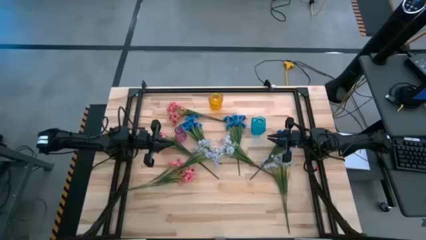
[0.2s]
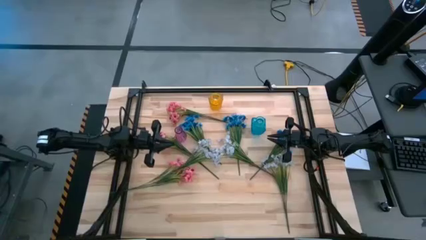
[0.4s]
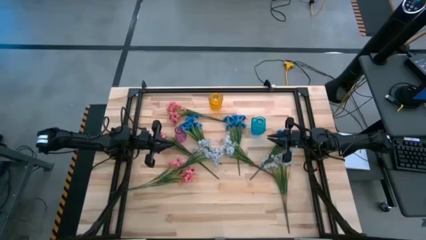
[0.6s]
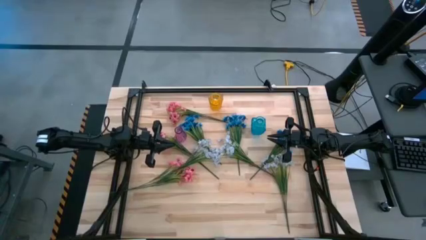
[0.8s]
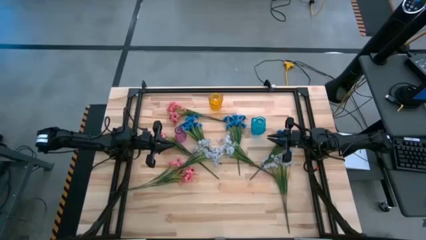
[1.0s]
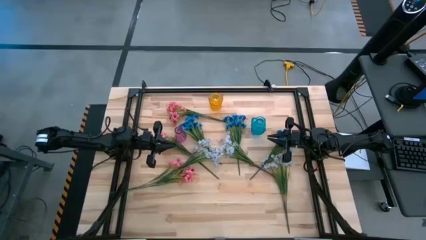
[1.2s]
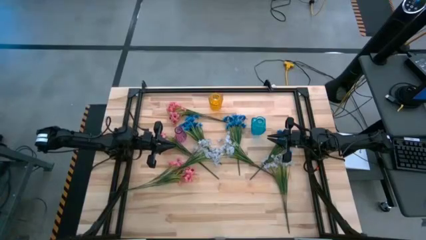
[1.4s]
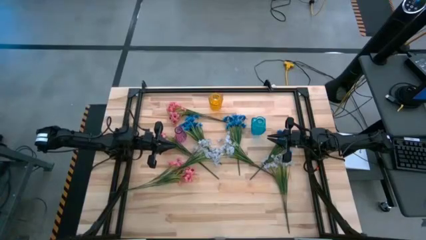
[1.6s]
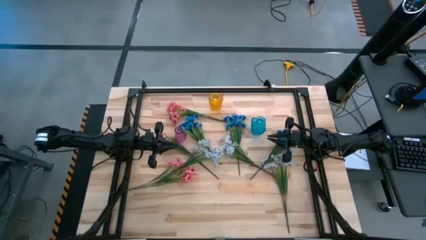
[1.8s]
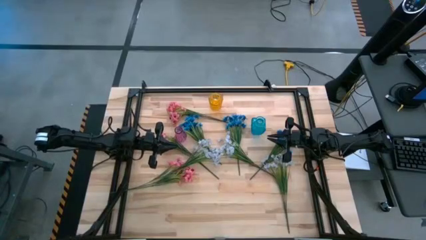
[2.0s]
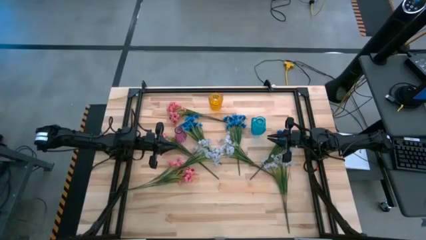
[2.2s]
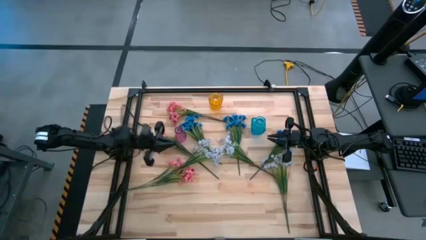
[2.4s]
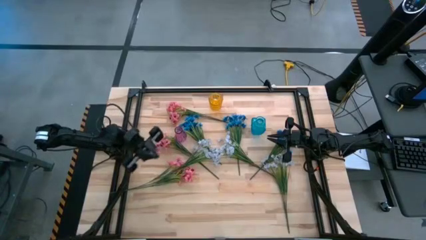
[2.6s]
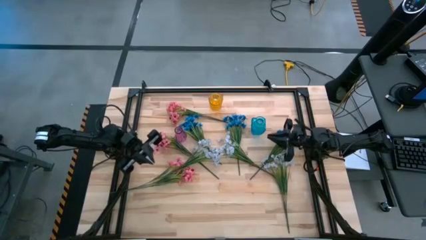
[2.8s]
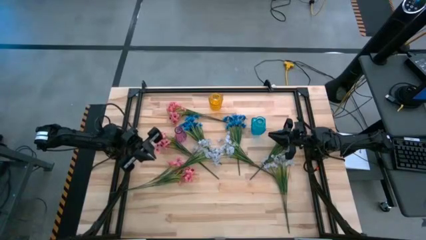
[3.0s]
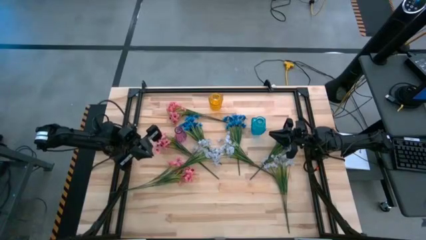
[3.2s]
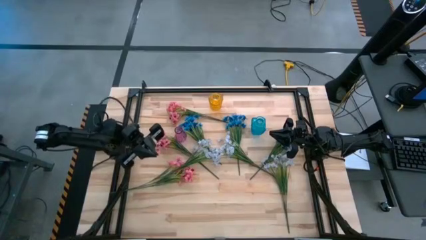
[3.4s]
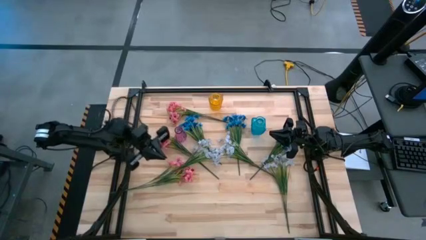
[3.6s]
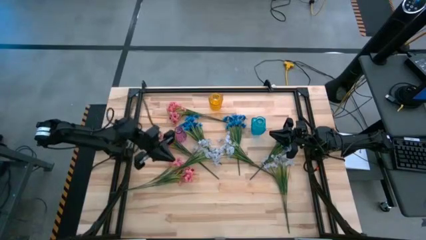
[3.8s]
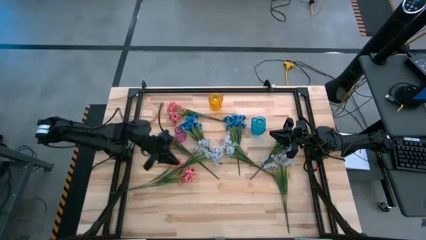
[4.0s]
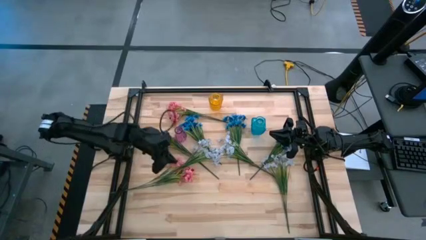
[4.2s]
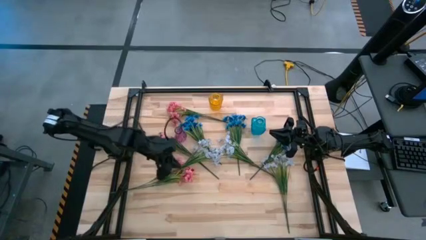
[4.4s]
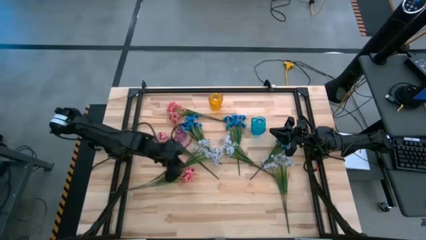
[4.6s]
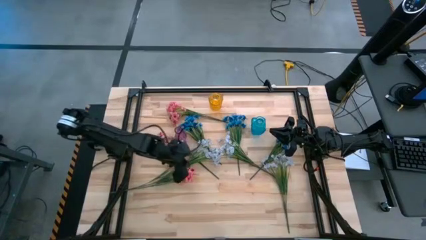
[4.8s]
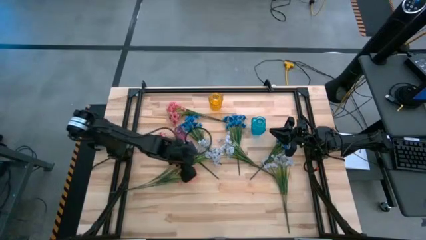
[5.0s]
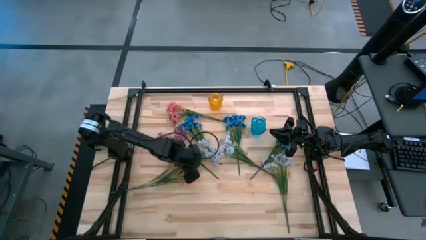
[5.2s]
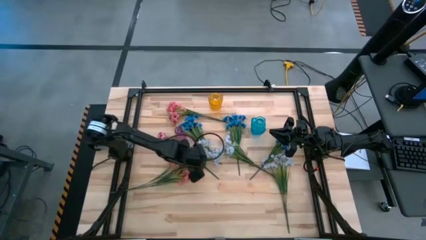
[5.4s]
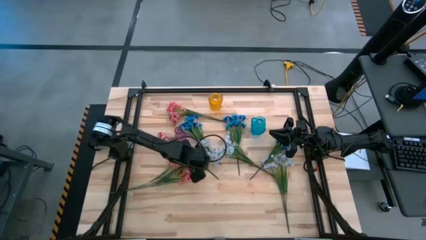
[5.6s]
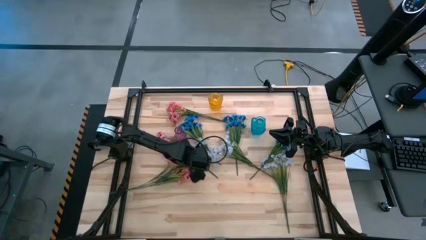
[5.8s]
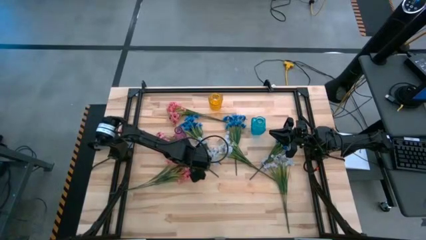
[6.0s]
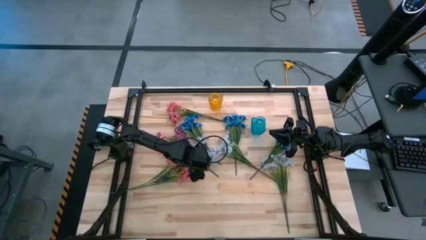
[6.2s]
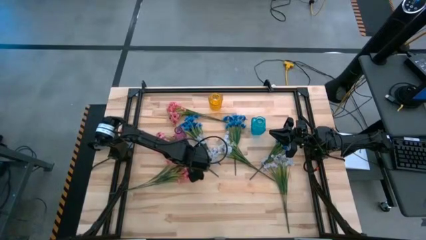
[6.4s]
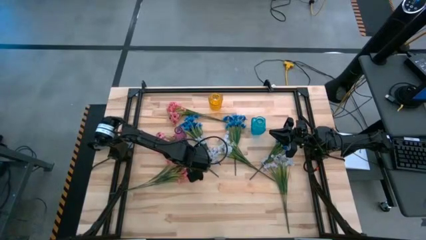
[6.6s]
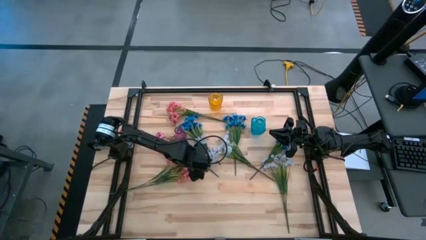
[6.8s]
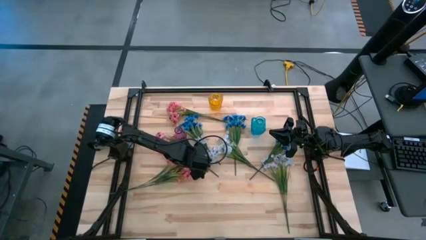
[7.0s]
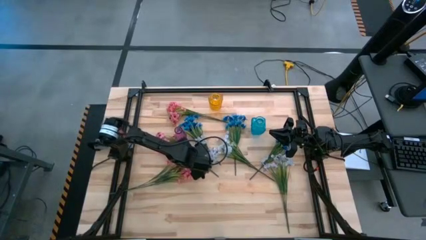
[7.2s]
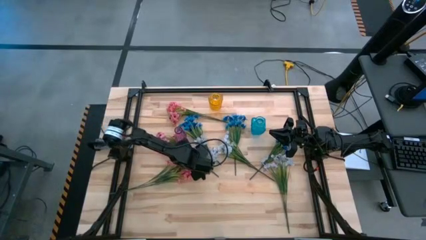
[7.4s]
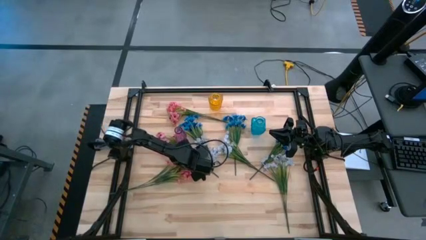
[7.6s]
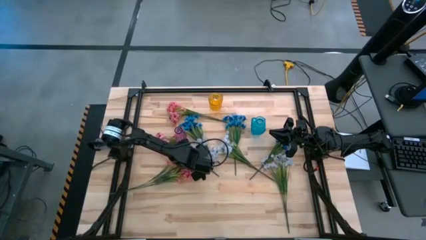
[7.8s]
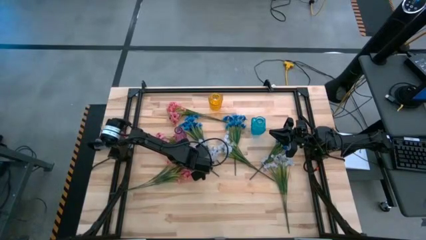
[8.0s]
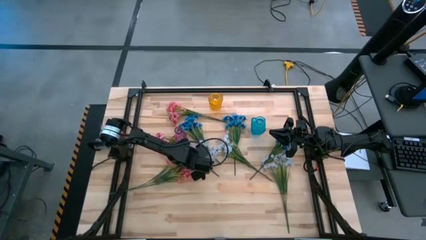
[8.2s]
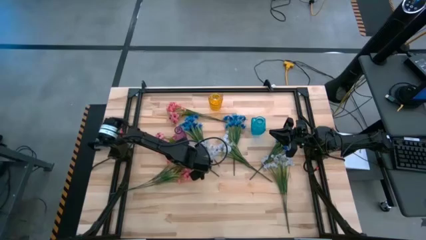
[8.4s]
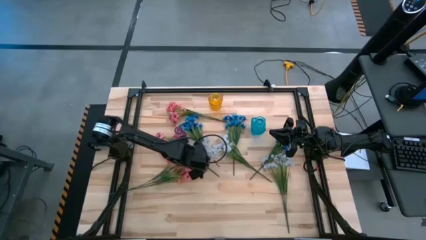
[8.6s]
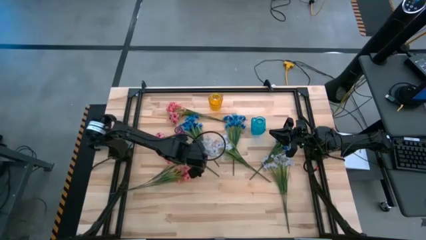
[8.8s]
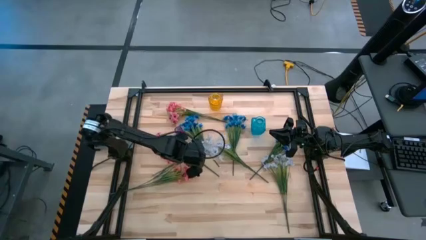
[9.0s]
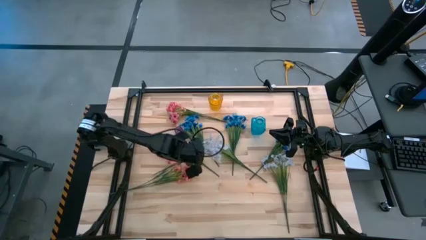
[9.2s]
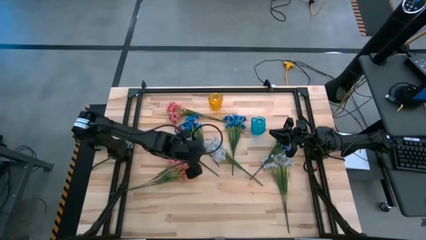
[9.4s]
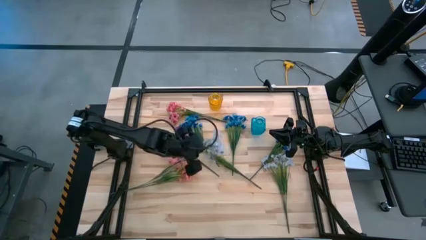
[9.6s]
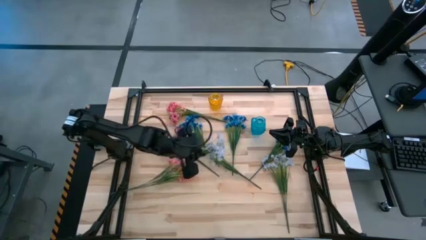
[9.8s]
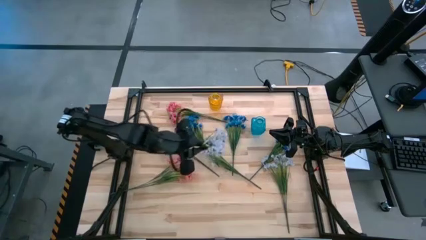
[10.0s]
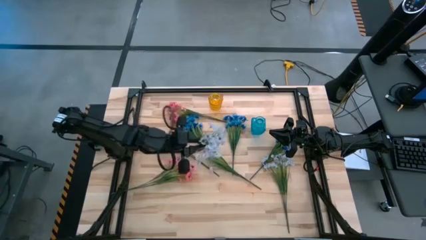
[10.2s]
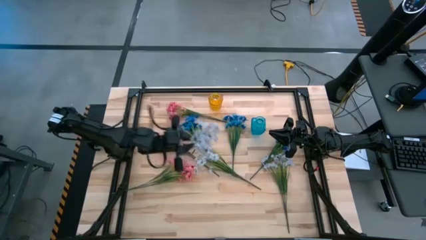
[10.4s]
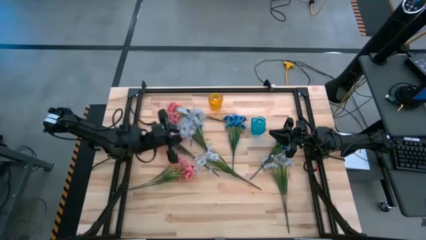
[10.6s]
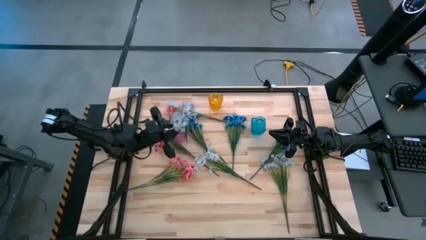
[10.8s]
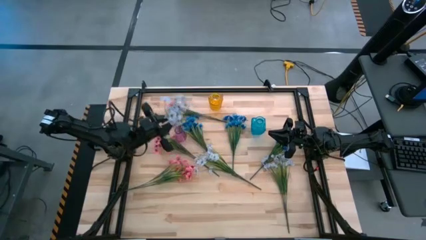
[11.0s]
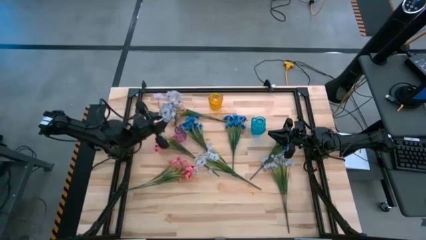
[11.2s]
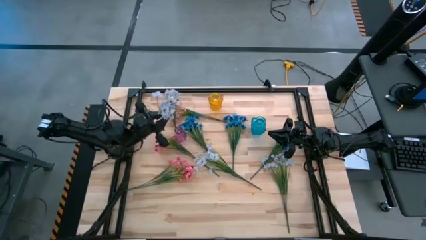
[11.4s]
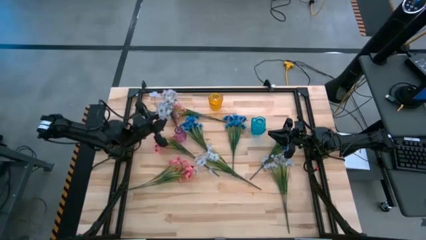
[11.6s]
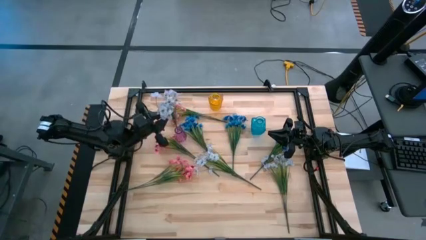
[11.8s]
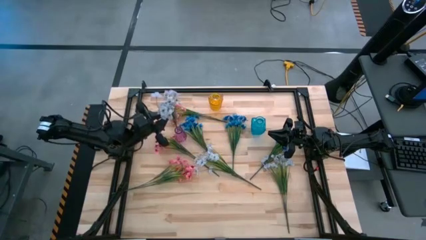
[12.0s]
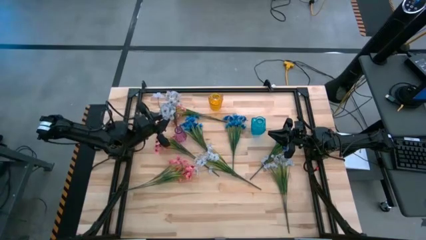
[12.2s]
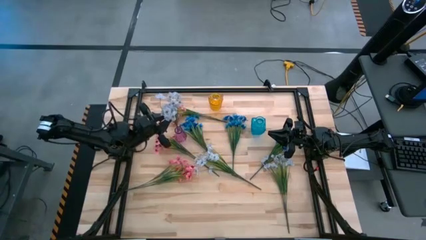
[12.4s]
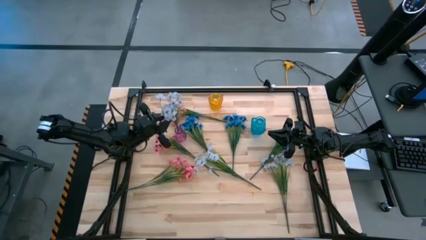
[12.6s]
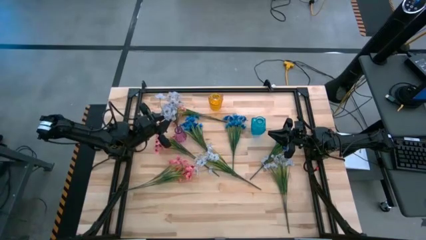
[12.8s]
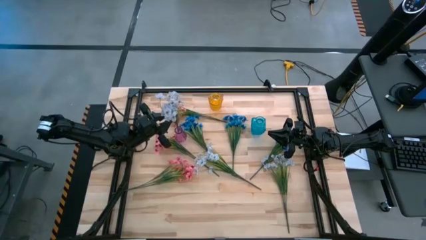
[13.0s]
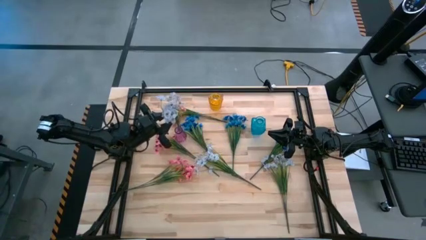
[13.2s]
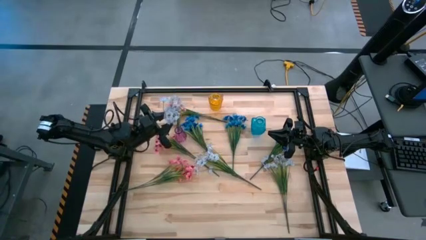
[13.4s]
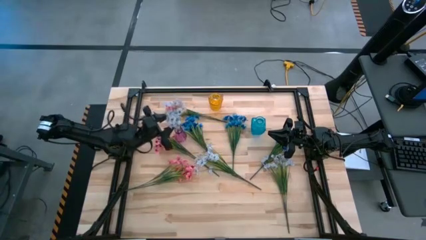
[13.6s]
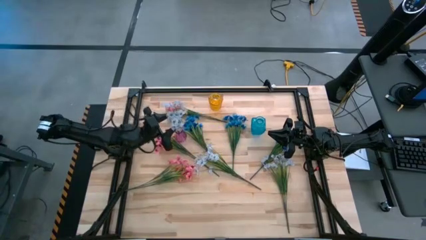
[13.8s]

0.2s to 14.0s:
Task: Sort flowers into vase by color
Put the left white flowers into the purple vase
